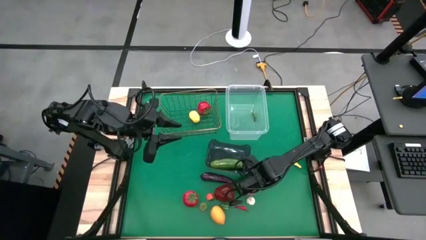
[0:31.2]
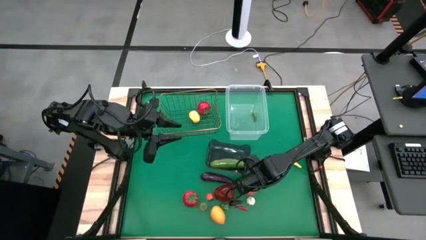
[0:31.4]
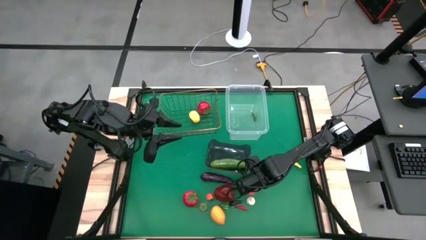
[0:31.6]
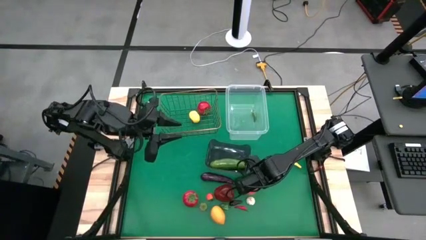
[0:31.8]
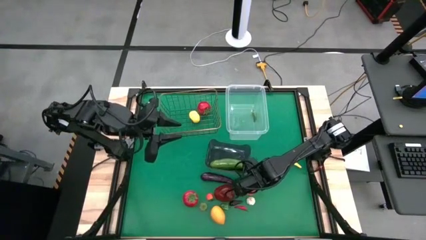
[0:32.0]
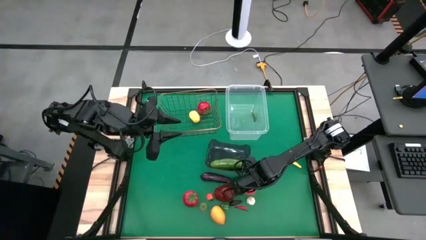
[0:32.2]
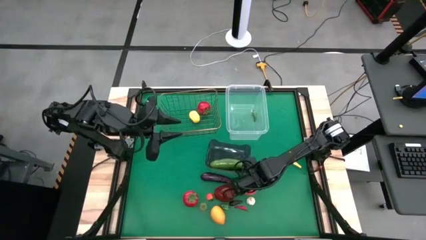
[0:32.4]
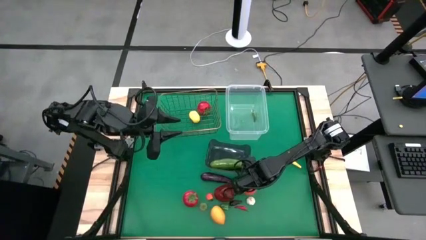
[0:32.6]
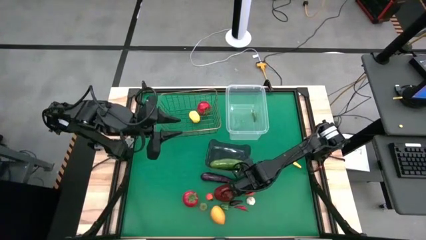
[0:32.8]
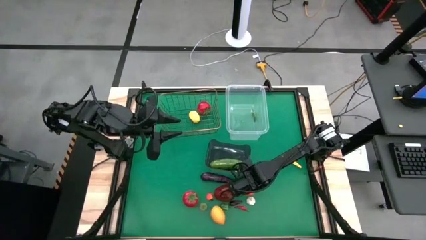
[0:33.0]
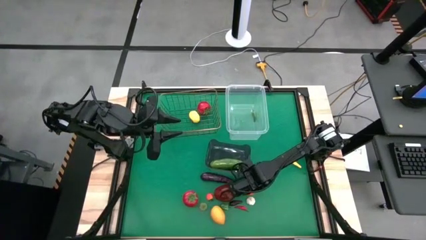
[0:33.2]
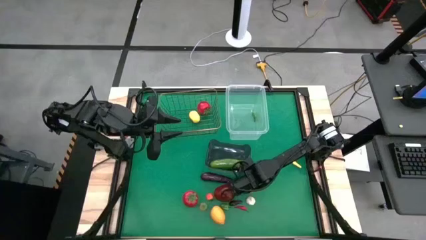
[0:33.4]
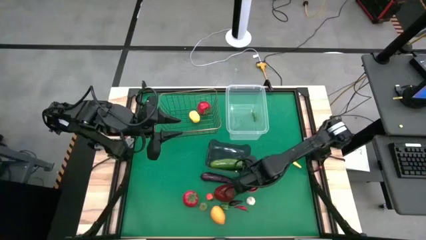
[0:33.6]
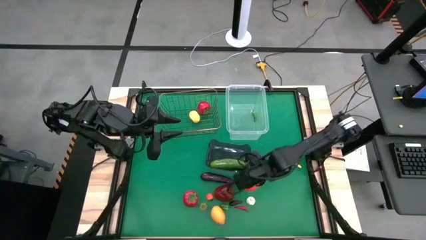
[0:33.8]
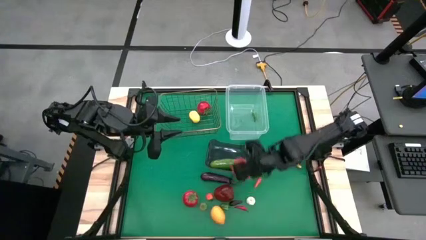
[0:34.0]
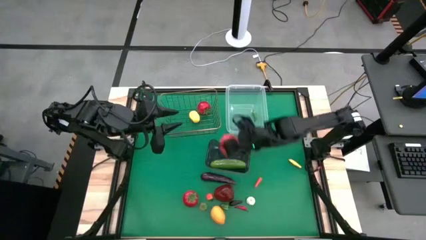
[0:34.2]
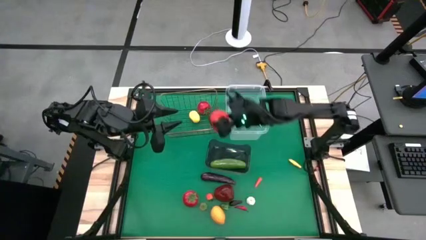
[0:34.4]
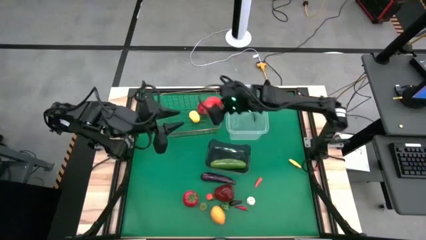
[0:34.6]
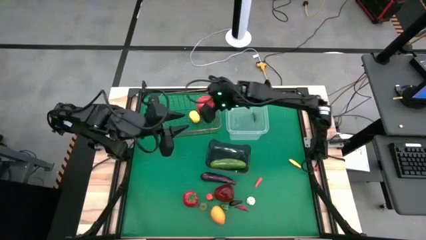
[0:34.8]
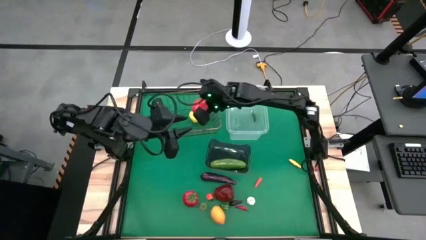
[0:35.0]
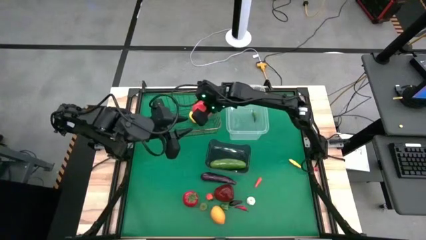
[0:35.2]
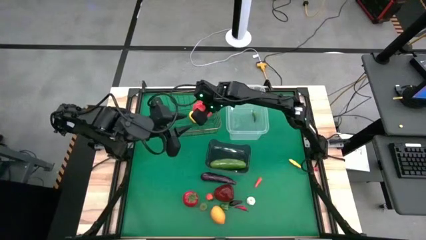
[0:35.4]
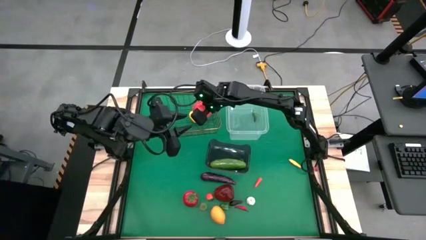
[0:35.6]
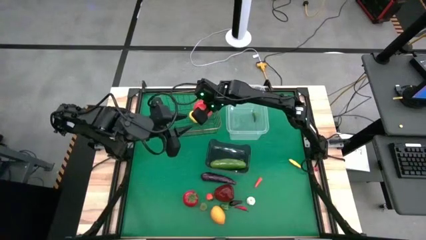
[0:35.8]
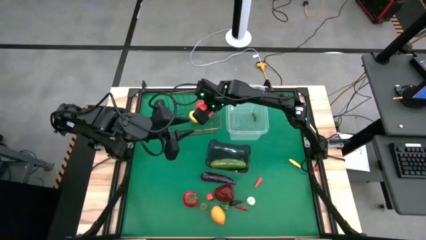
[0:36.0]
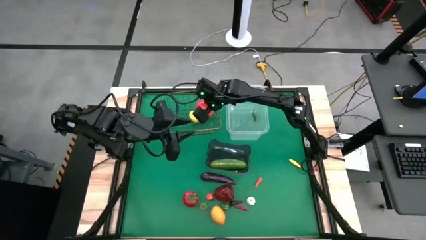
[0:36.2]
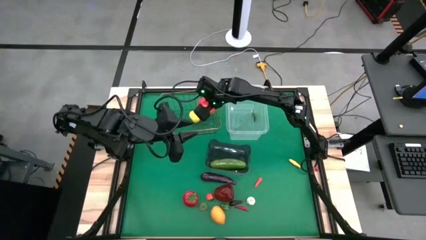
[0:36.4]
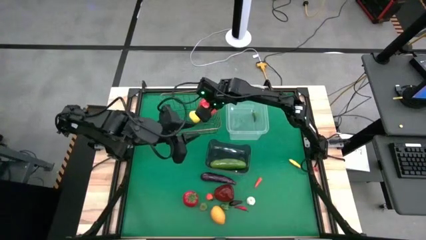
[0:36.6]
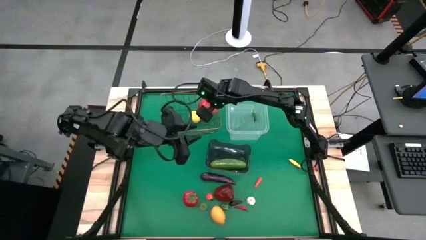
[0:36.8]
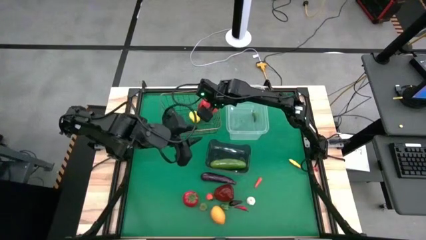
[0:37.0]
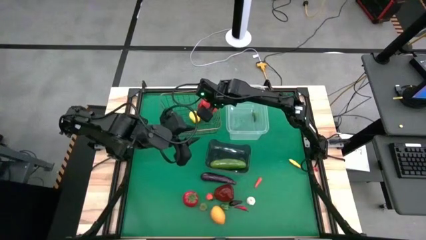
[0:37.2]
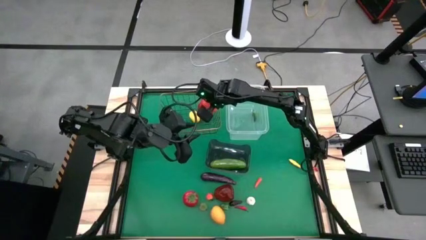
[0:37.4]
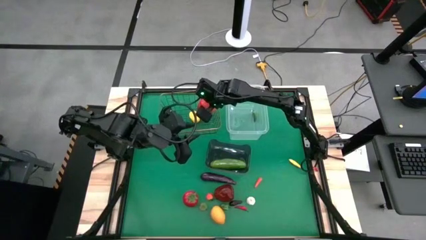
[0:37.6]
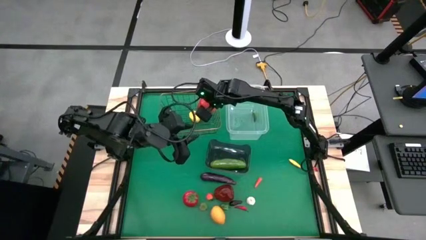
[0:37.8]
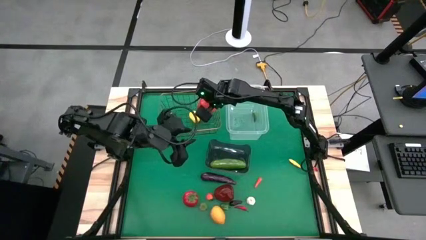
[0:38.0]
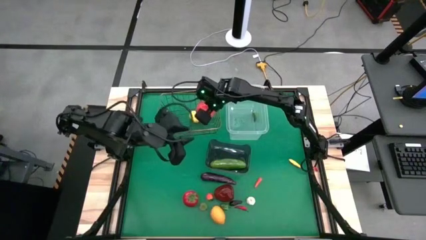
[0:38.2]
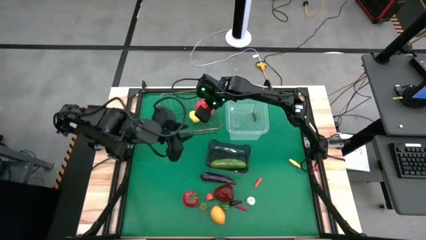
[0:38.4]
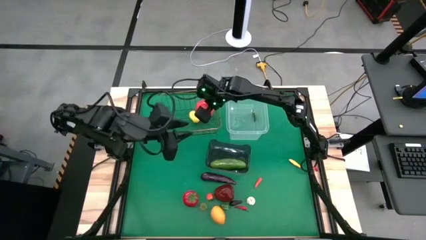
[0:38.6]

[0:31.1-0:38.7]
Task: Sort produce into baskets
Put the apple into the wire basket

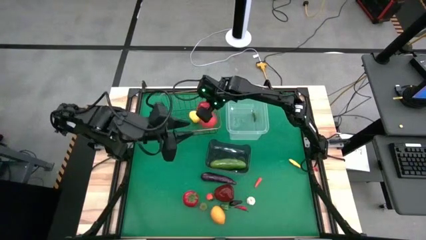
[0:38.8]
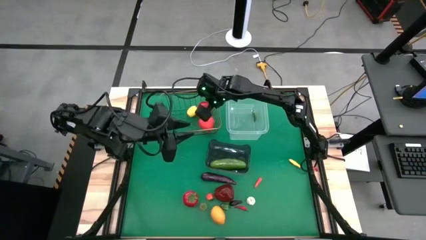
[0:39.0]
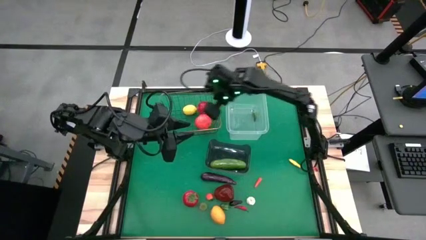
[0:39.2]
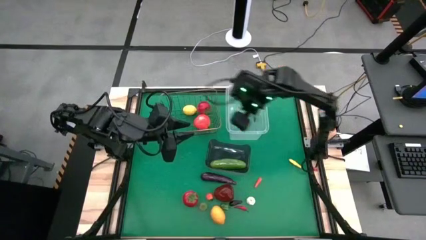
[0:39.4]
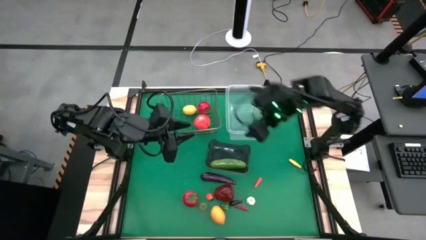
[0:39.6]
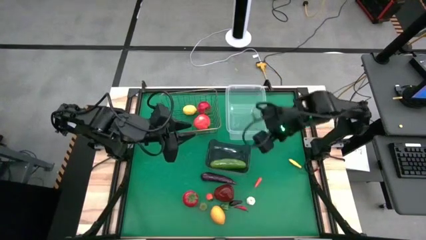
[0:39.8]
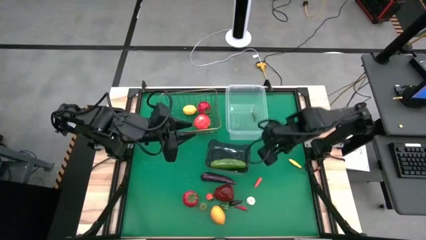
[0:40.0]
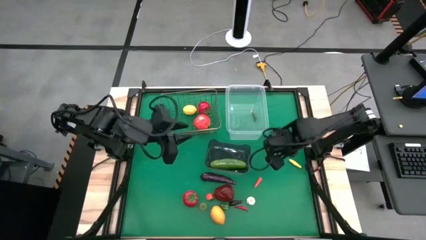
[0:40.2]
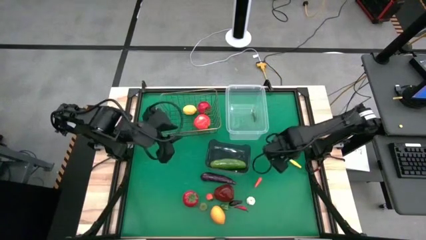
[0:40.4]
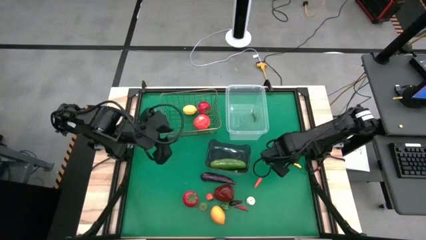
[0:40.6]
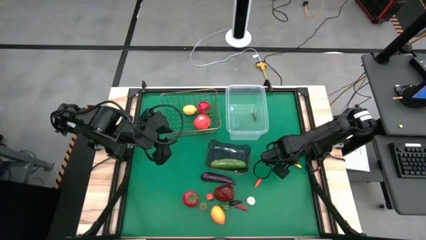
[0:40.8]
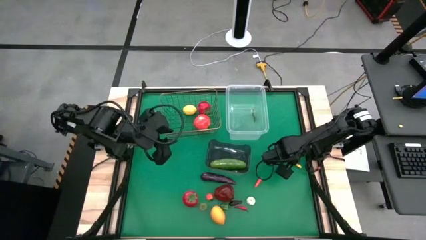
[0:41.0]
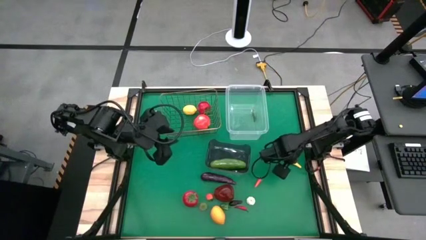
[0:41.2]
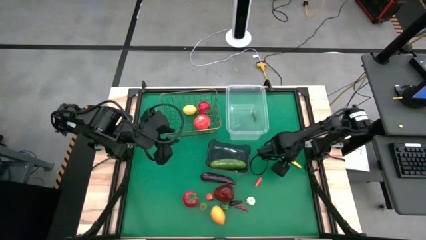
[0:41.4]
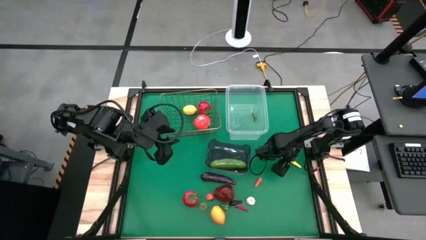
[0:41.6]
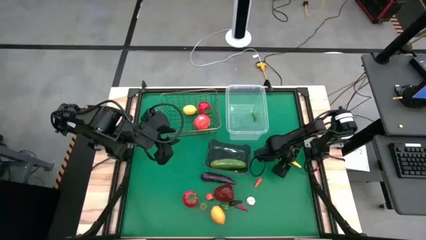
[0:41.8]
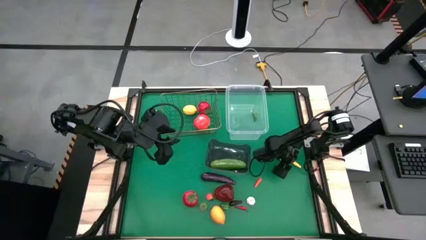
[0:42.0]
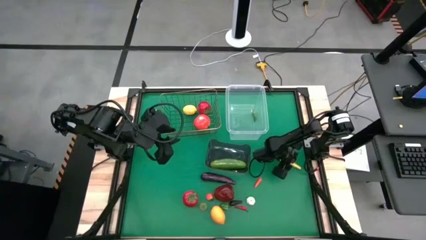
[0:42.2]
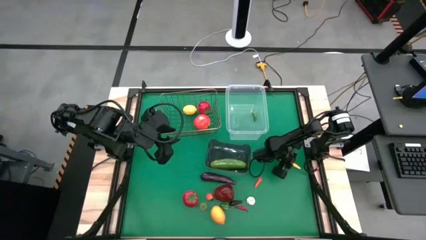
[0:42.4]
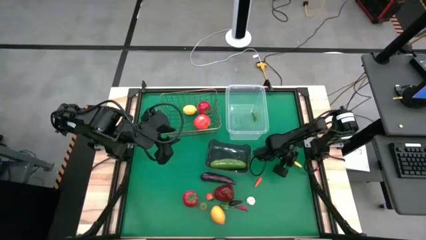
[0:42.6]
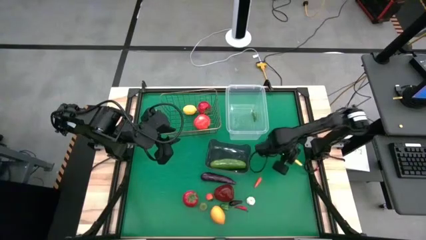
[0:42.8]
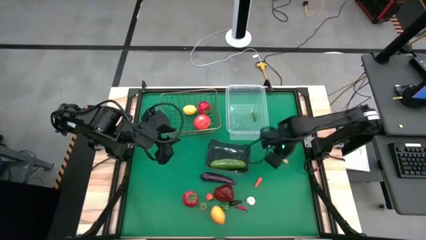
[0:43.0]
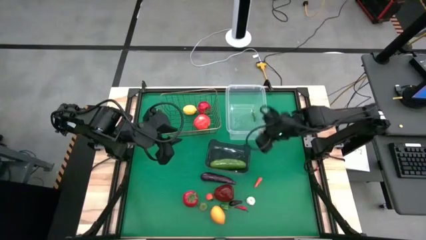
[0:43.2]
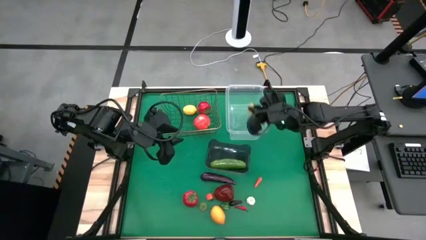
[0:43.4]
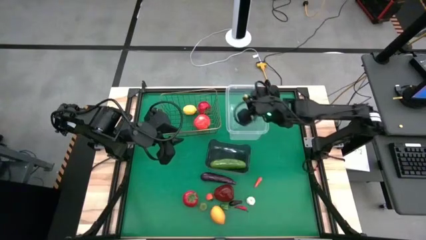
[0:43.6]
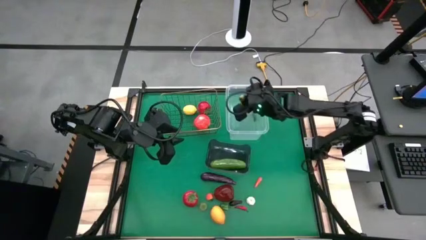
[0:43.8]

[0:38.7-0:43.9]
Put the yellow chili pepper into the transparent bin

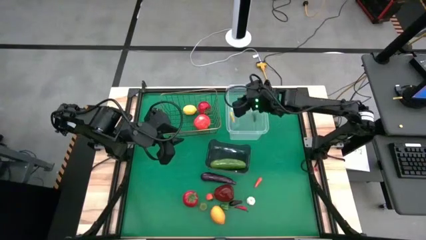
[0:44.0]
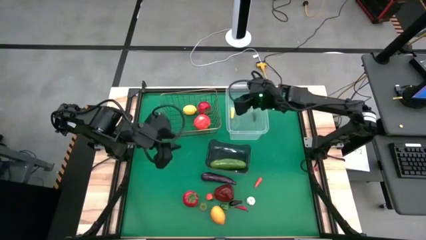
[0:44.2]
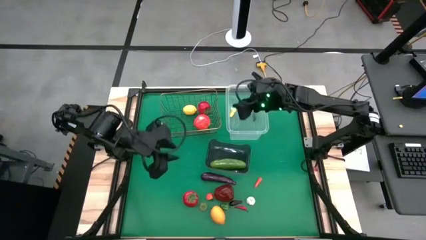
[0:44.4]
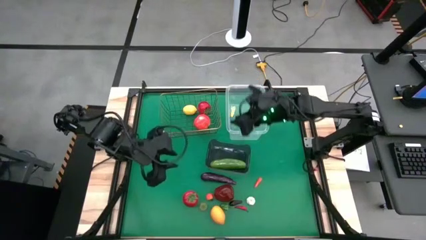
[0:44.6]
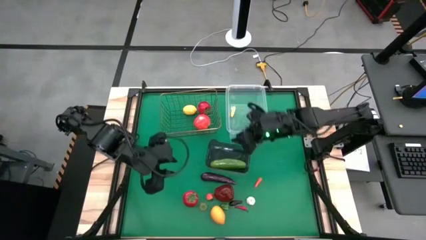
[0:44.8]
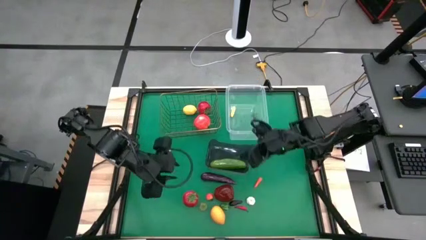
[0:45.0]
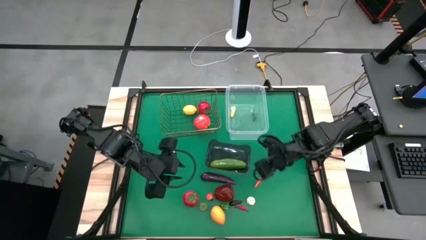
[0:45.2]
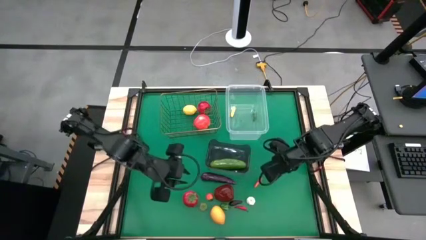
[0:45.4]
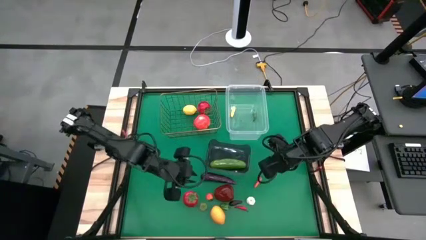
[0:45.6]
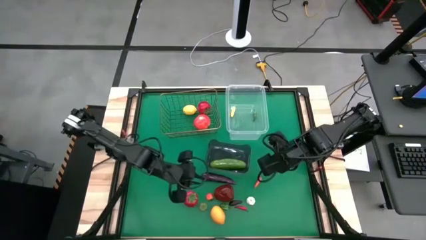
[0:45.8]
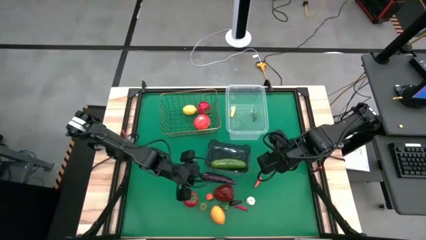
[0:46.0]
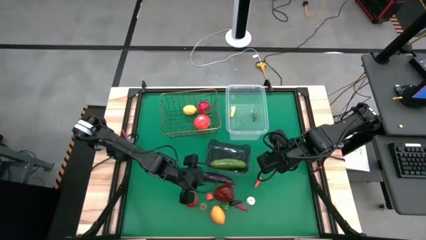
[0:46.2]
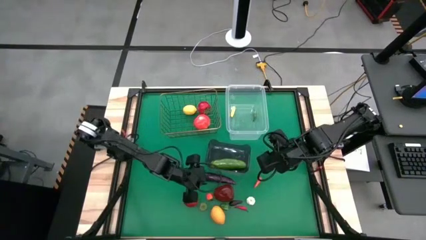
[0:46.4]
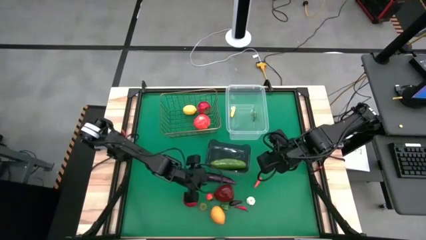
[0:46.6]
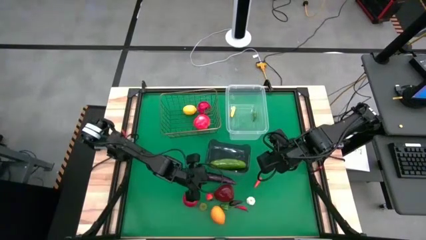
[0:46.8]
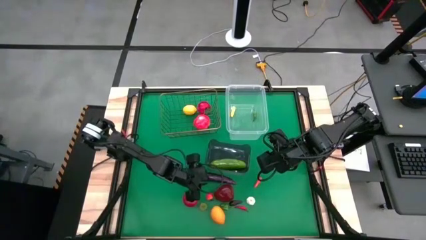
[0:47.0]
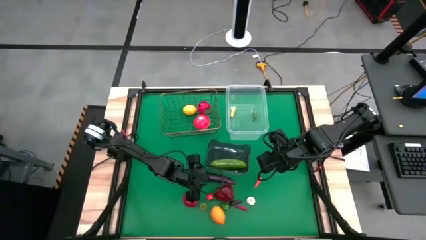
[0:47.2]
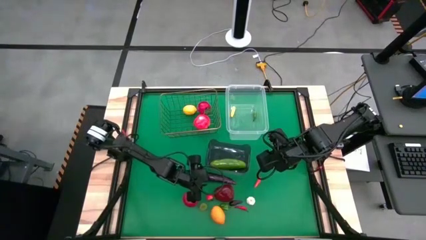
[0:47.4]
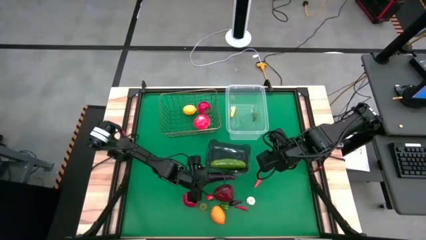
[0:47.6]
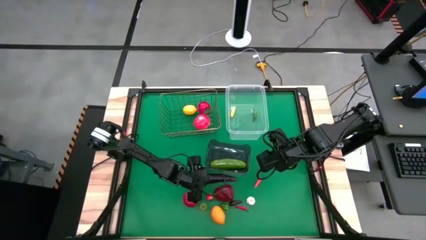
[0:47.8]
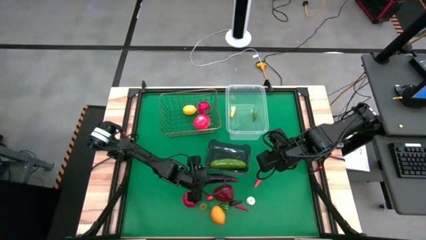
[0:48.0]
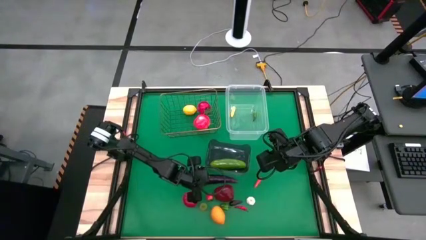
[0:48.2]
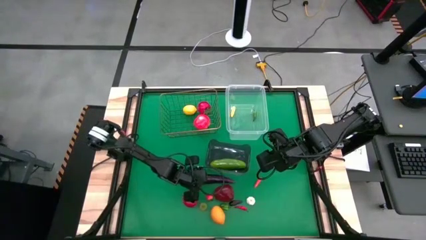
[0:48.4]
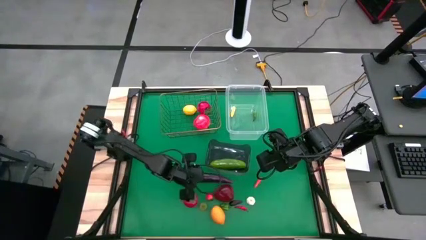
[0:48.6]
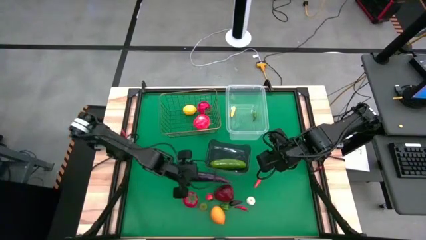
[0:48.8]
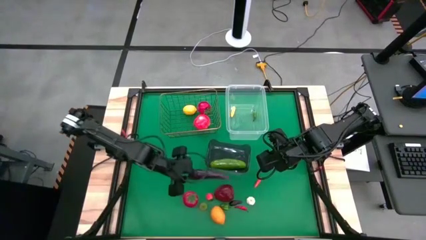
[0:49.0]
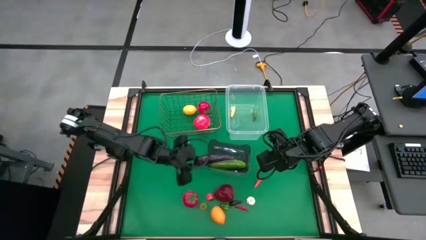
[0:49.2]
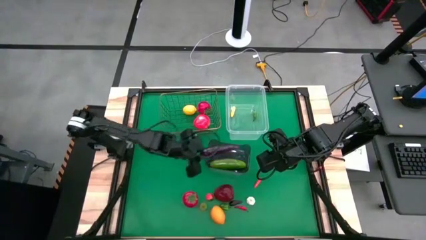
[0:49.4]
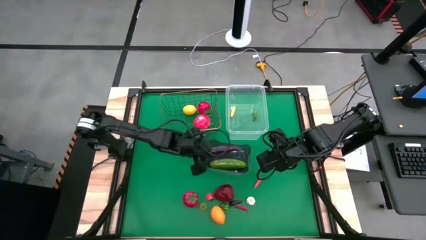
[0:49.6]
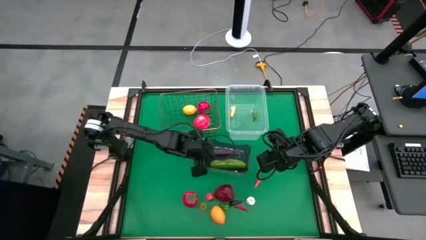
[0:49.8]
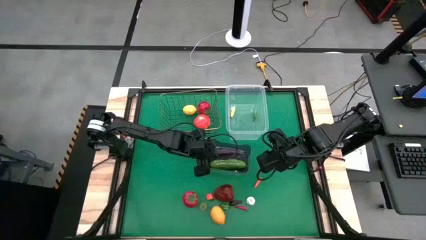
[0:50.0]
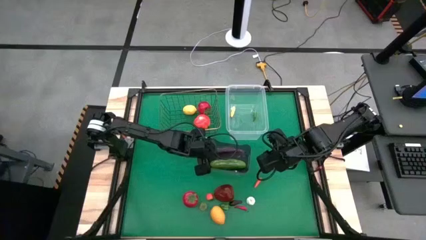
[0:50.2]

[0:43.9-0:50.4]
Put the eggplant into the black bin
